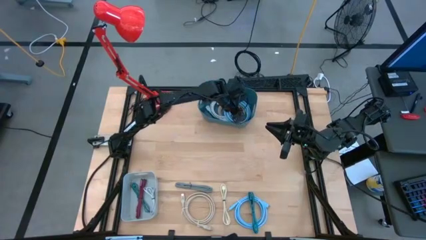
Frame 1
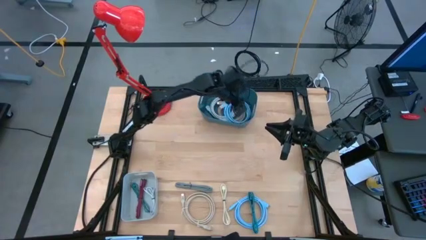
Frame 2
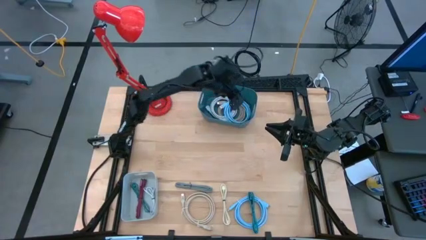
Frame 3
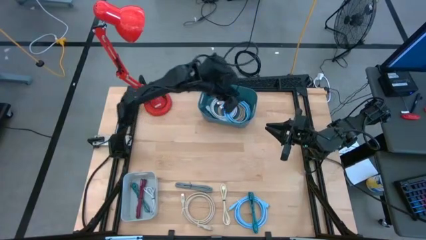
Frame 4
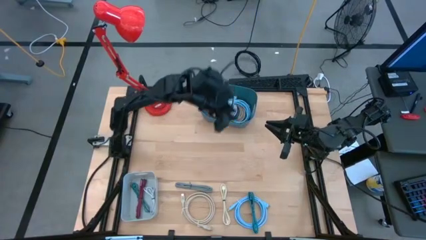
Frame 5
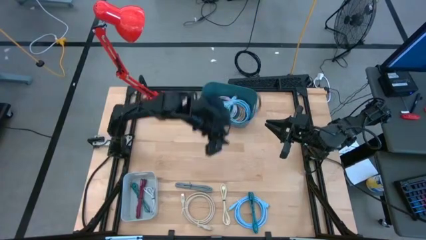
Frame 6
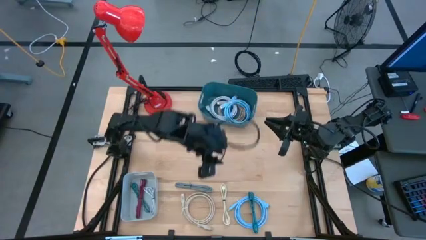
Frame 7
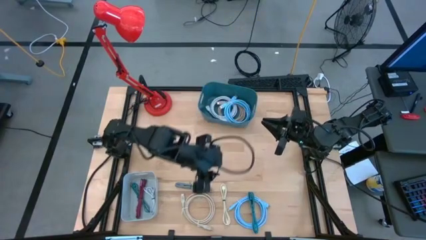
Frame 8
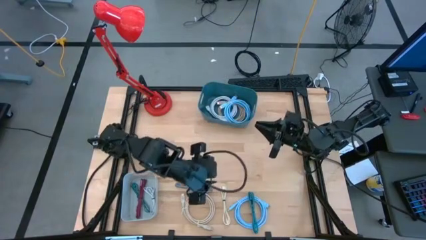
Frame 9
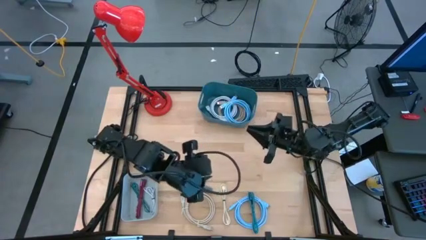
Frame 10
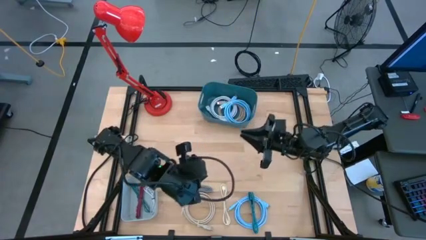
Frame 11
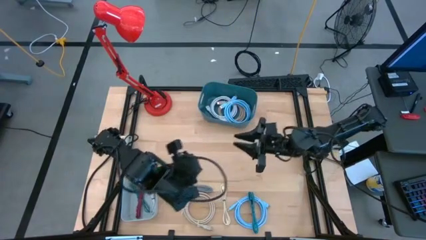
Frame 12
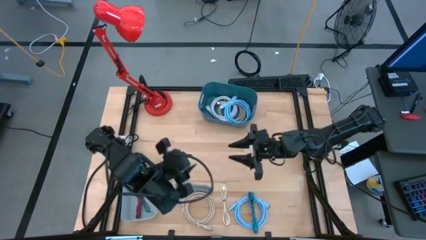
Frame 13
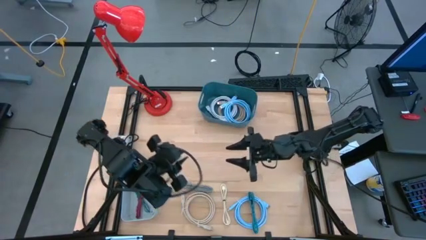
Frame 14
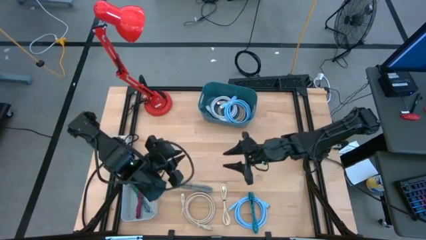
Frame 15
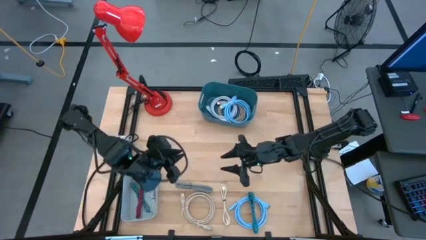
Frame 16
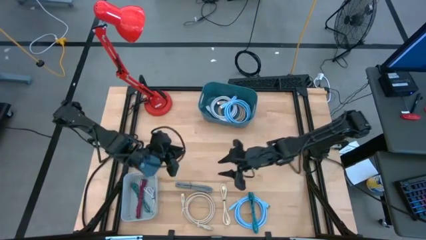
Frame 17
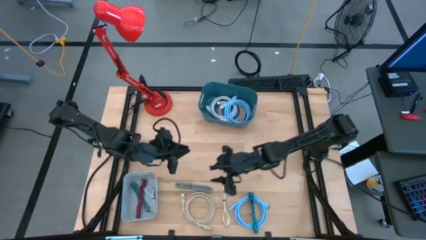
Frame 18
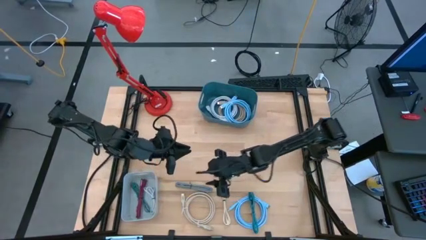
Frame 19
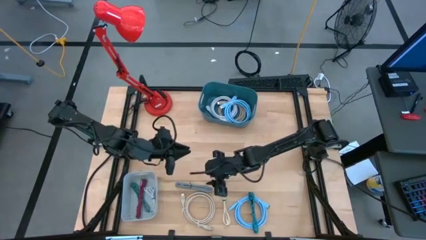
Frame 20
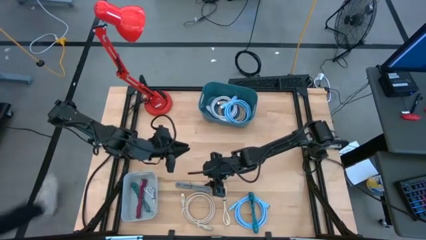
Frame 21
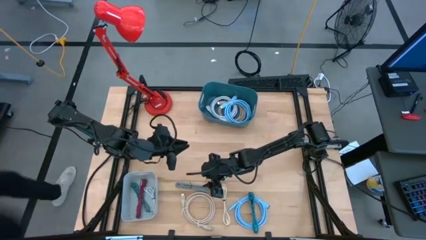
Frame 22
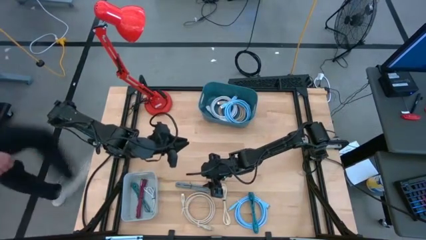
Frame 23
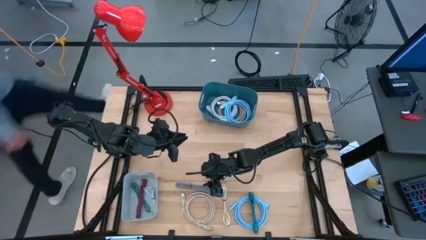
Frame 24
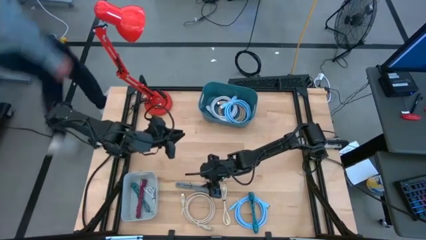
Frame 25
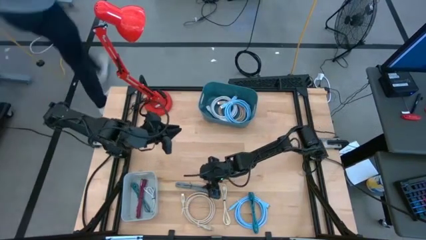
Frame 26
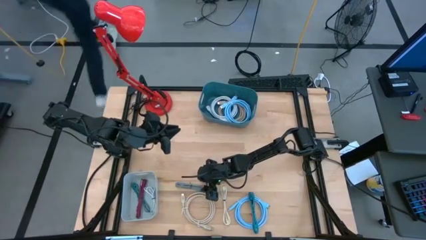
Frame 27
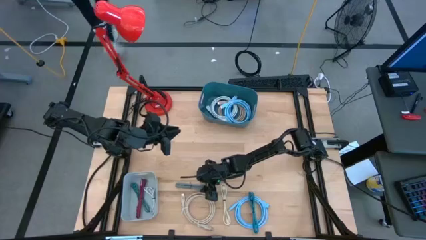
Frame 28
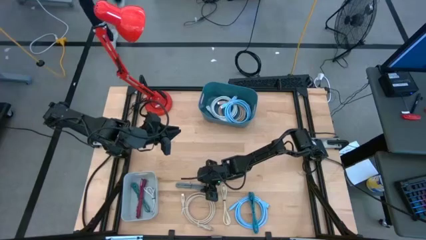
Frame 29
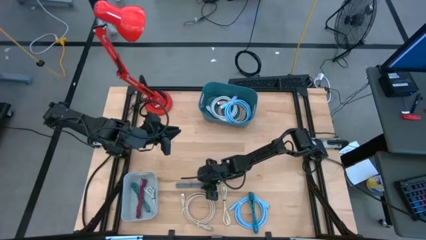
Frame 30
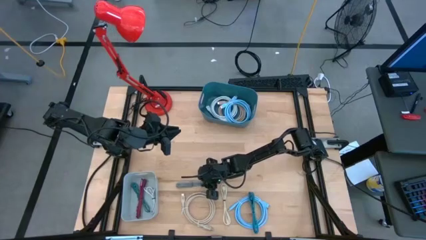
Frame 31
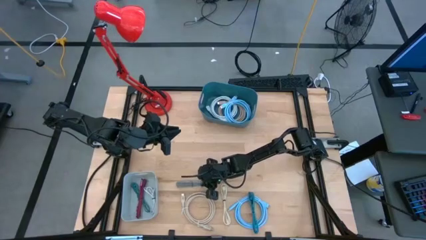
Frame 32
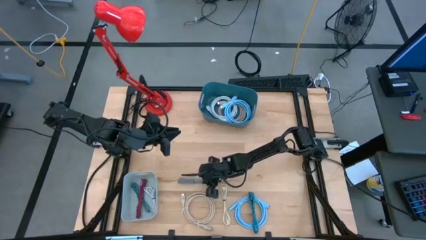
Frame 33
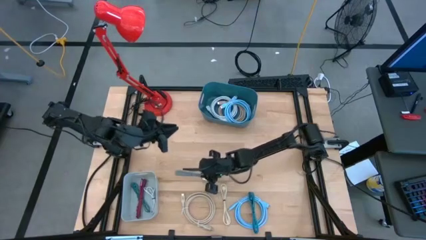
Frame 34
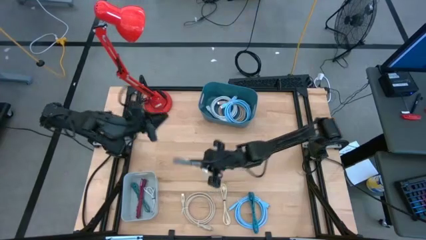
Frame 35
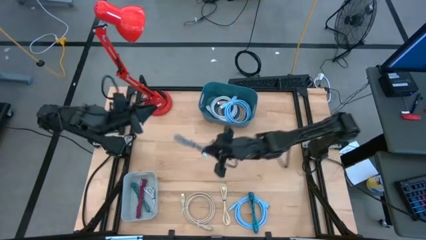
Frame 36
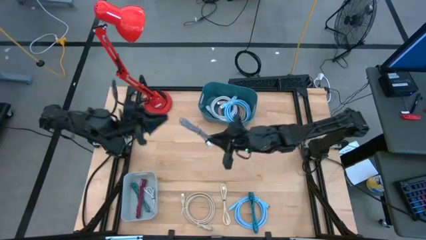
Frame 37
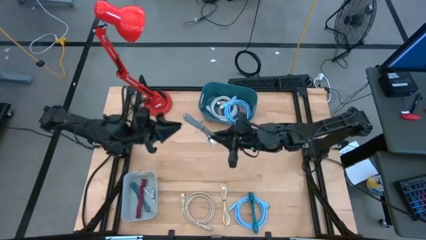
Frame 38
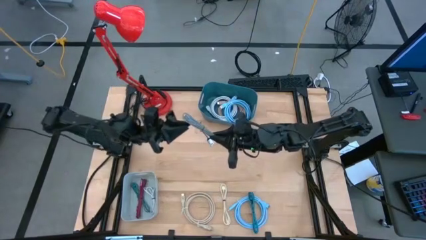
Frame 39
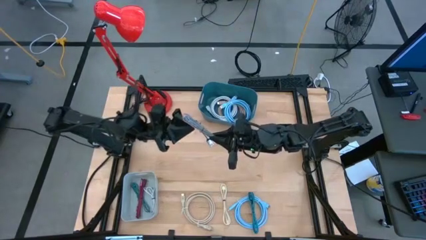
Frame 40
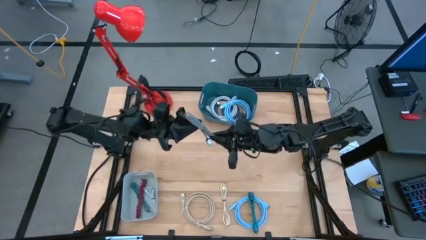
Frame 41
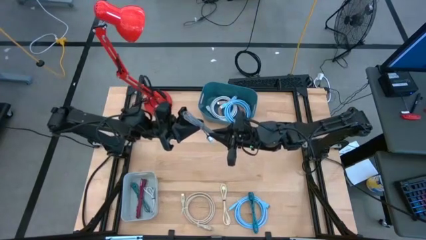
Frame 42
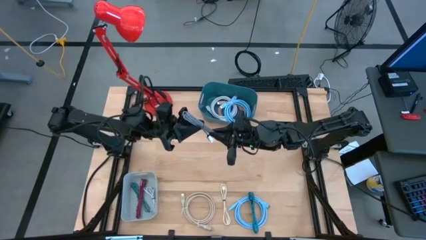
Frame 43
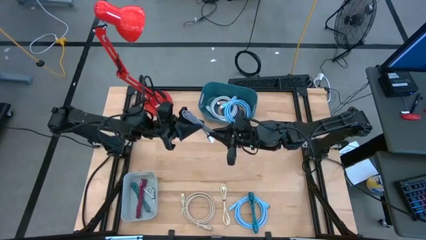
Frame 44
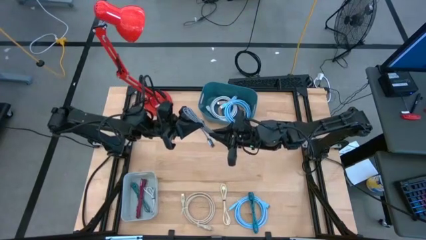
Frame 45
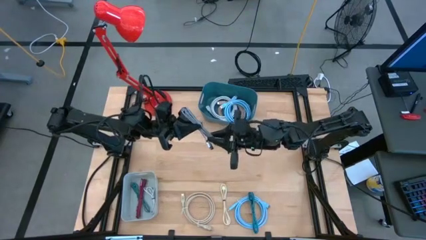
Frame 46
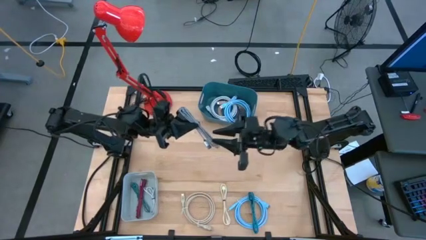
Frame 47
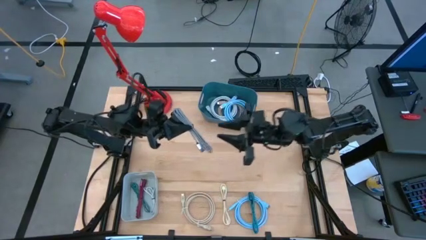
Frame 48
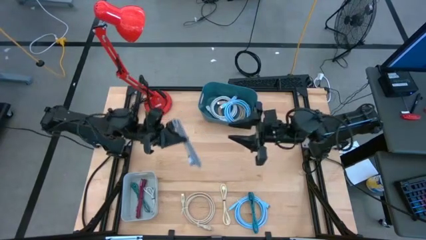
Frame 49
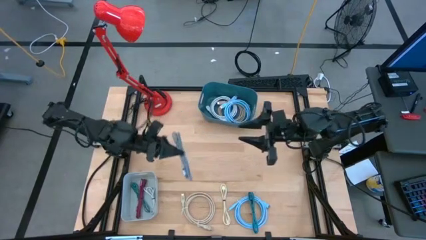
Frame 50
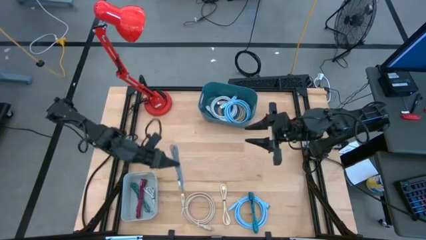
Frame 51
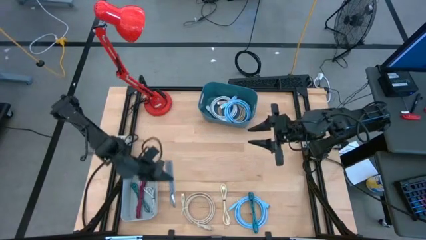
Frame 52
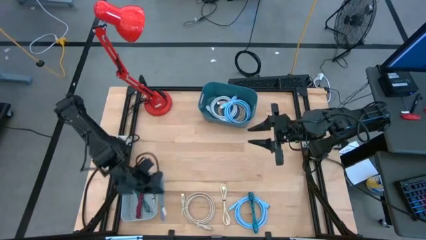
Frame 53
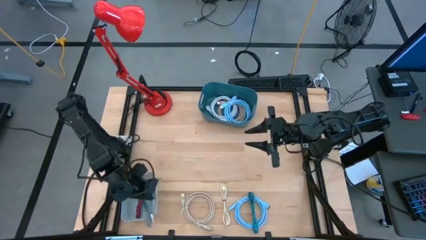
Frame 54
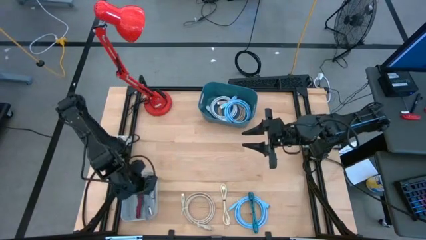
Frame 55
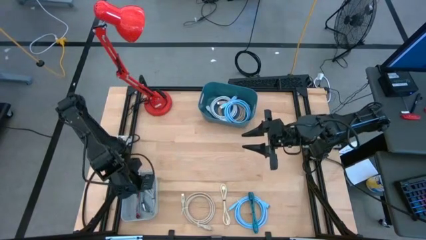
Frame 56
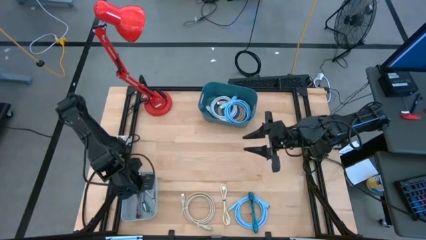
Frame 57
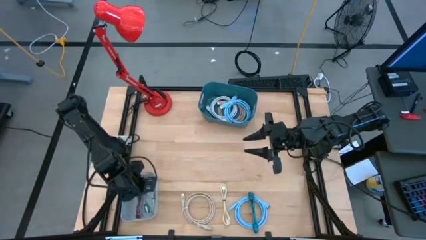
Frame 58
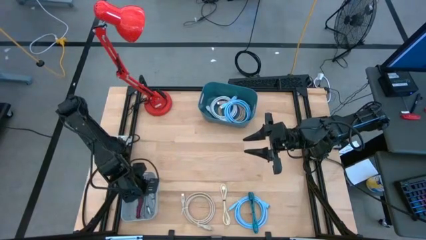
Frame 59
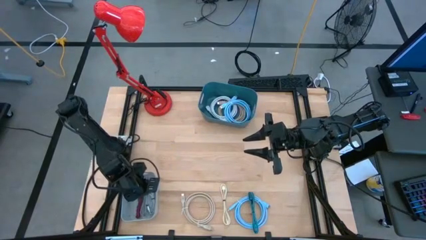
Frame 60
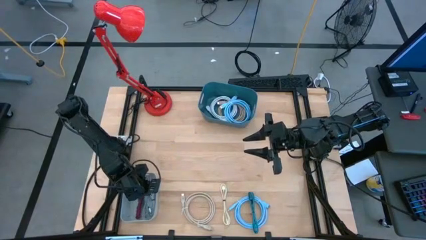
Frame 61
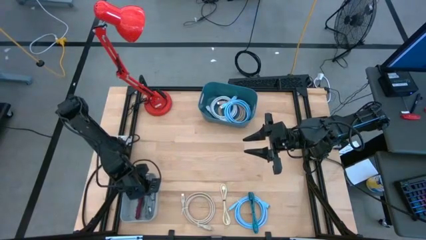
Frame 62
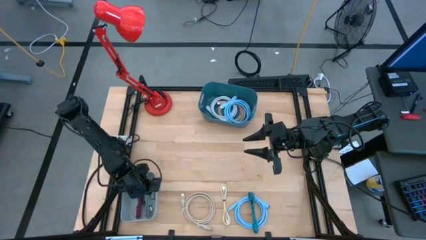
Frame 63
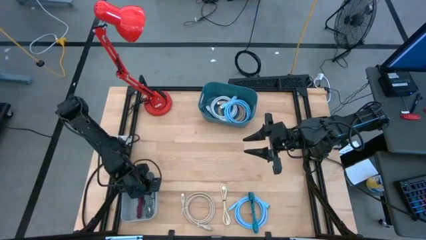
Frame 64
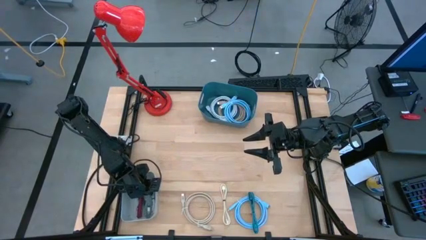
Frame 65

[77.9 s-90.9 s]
Task: Pick & Place USB Port
Put the dark gray charger cable into the gray bin

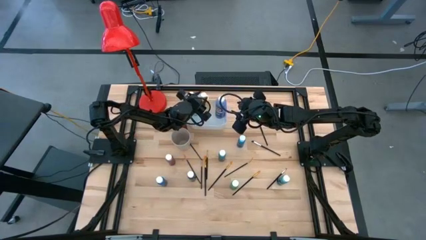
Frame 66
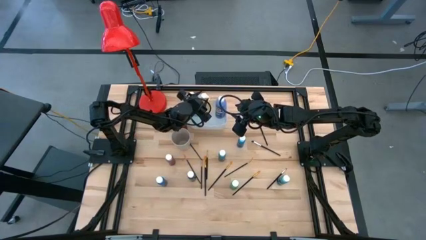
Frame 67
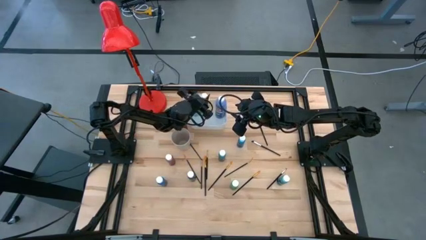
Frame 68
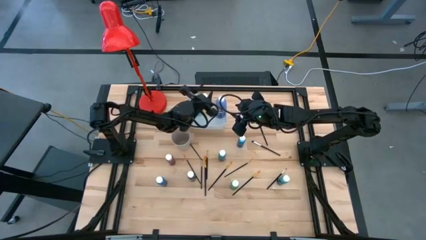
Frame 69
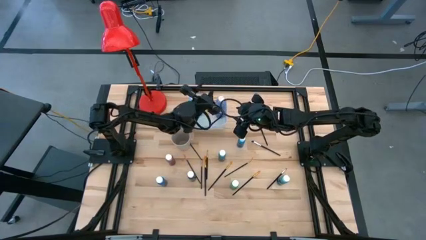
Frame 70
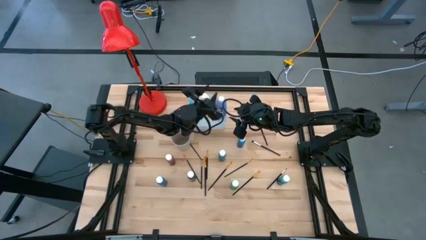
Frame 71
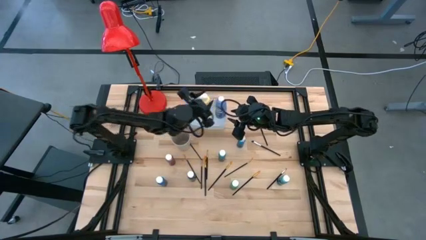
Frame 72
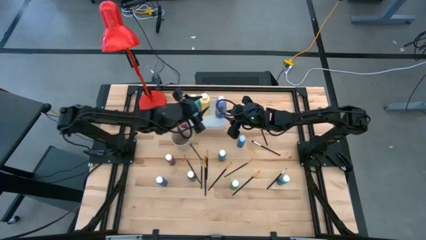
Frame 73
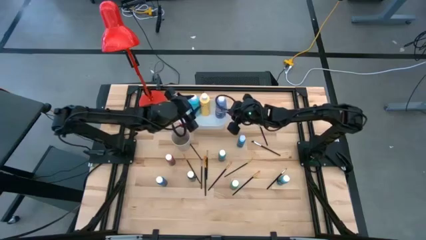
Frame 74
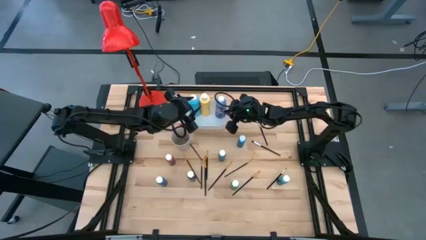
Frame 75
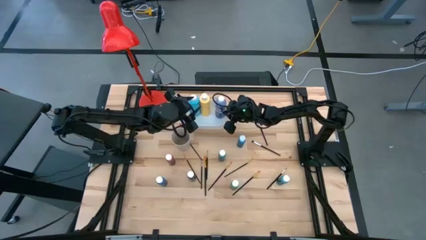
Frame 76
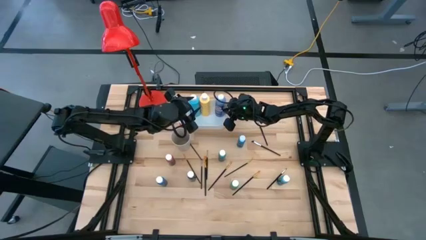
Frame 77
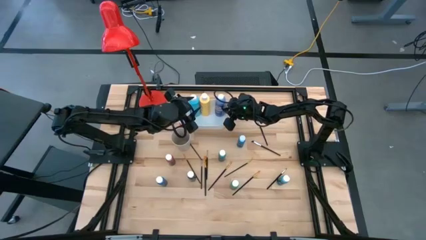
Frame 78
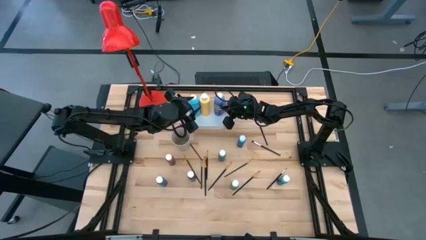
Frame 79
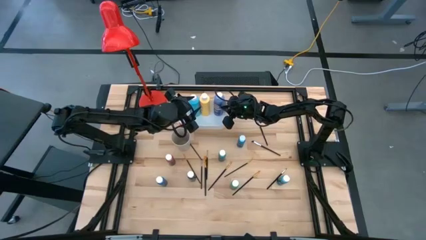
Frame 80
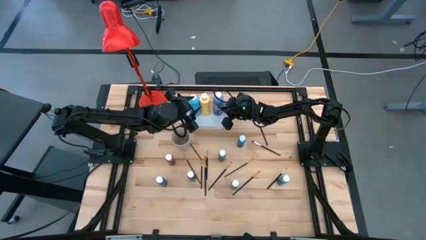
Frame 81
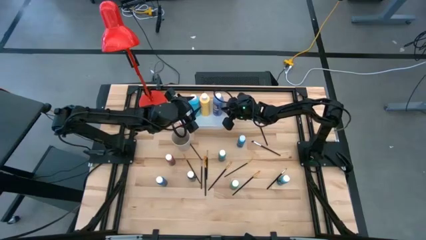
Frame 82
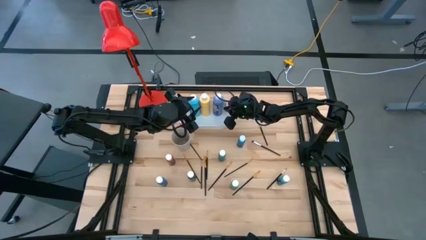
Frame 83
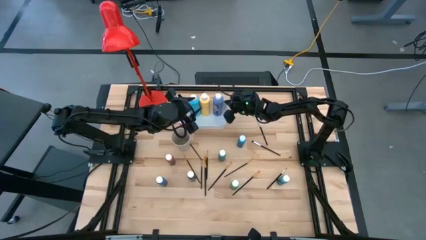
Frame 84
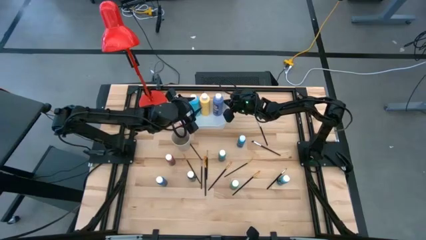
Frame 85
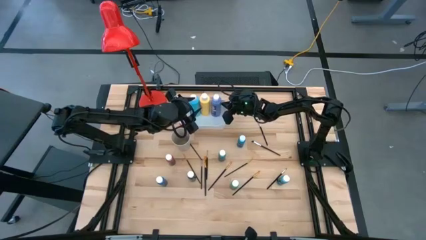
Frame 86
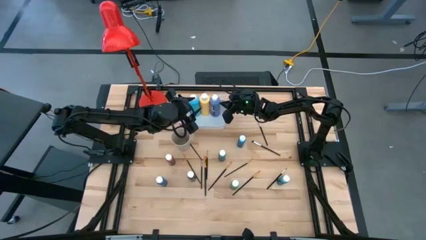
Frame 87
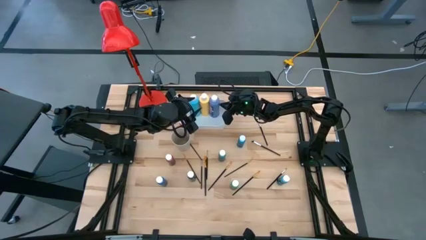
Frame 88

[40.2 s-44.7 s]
Task: Pick & Place Paint Supplies
Adjust the purple paint bottle in the white bin
